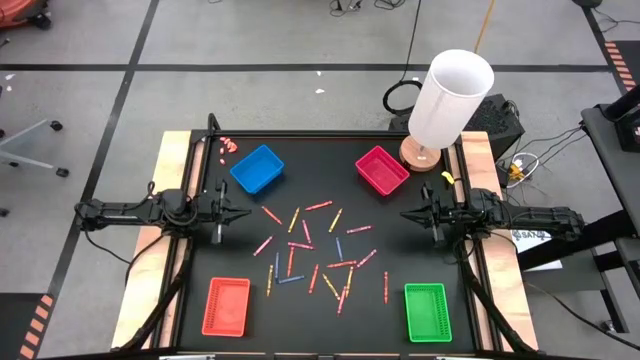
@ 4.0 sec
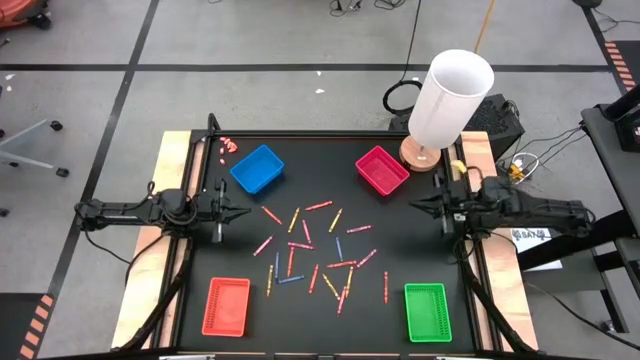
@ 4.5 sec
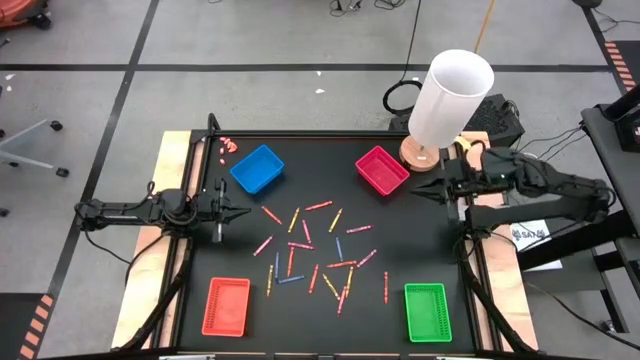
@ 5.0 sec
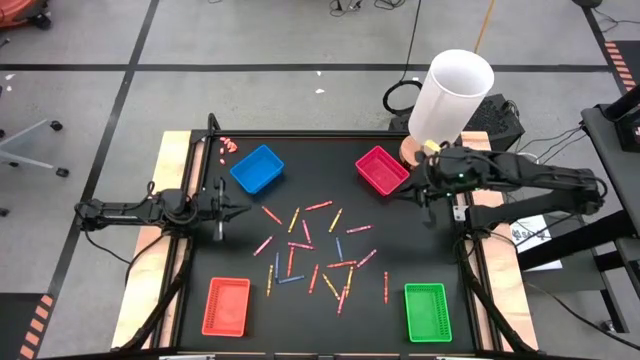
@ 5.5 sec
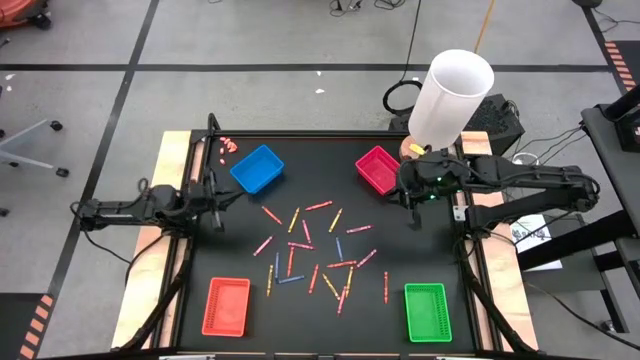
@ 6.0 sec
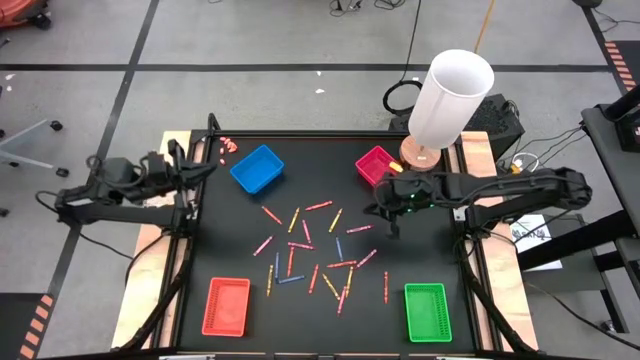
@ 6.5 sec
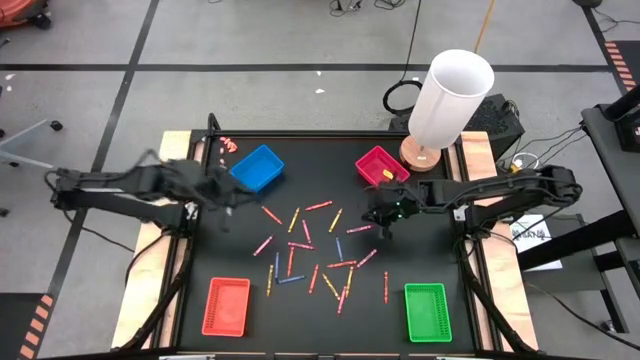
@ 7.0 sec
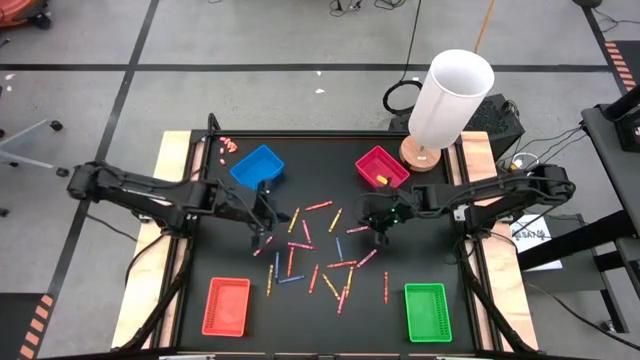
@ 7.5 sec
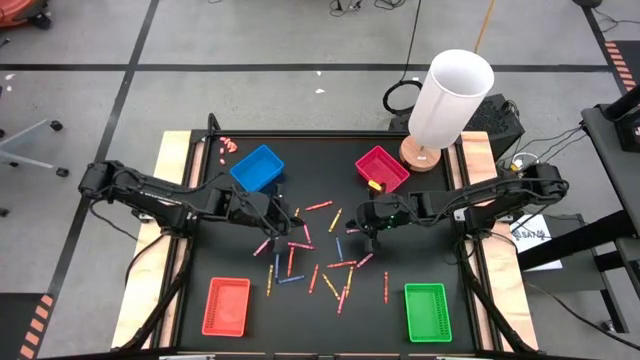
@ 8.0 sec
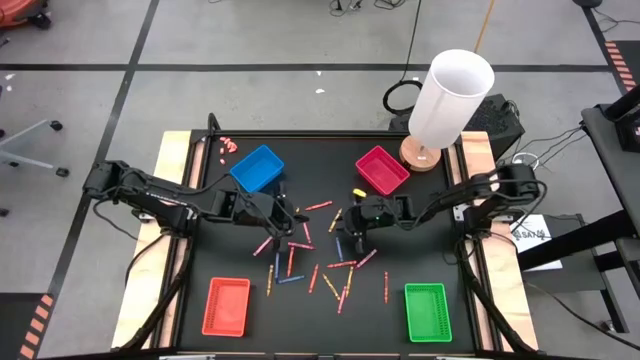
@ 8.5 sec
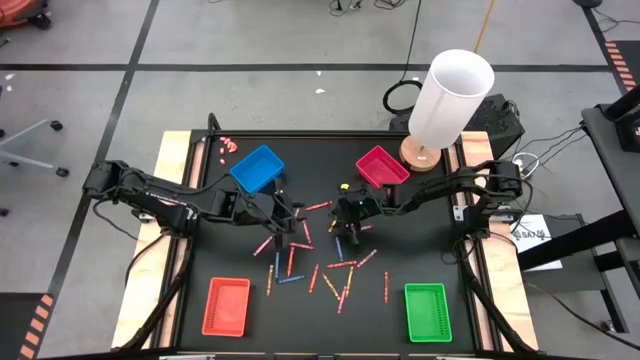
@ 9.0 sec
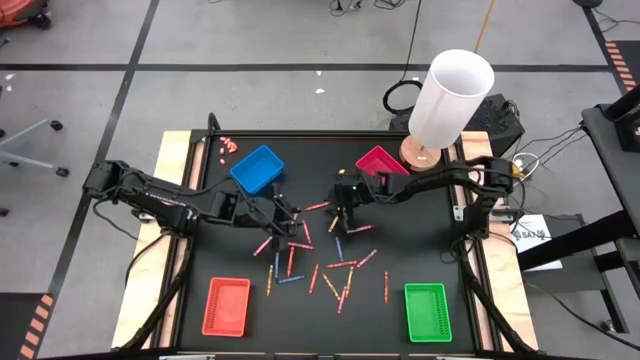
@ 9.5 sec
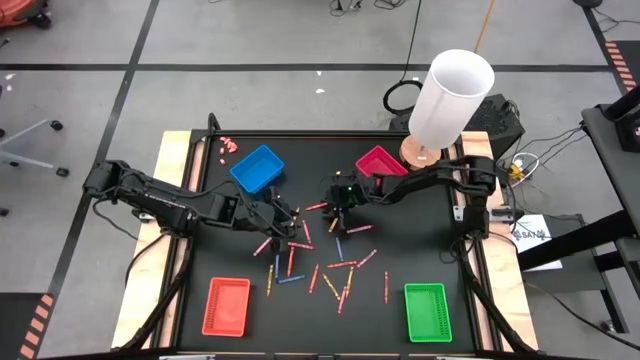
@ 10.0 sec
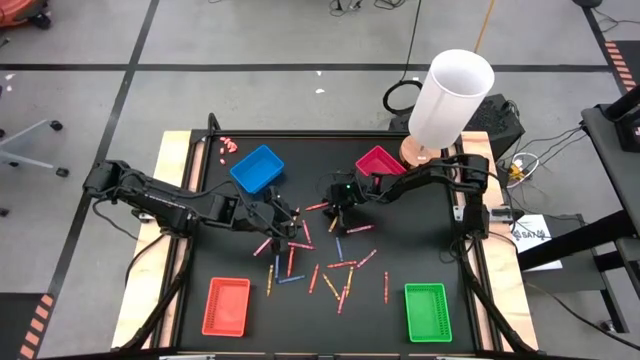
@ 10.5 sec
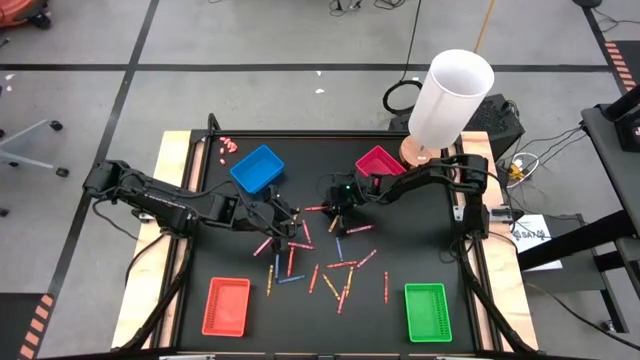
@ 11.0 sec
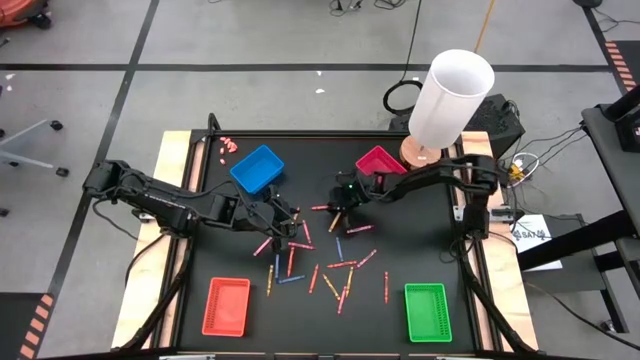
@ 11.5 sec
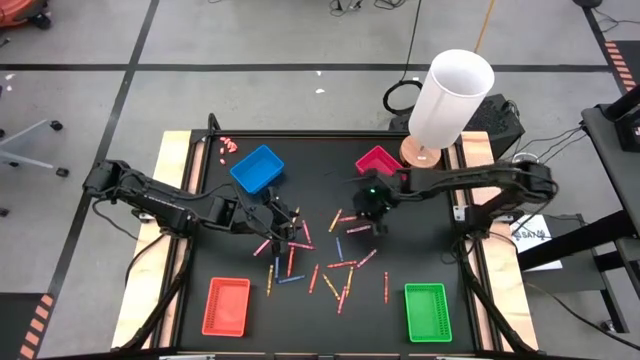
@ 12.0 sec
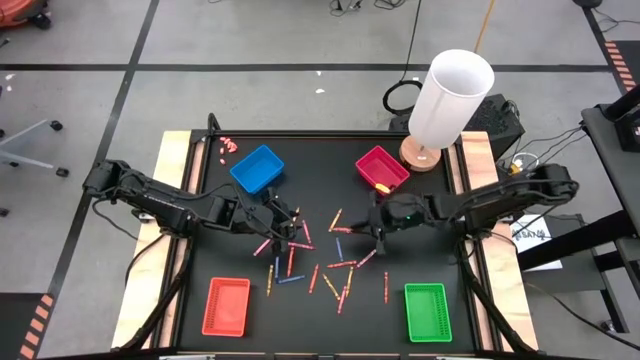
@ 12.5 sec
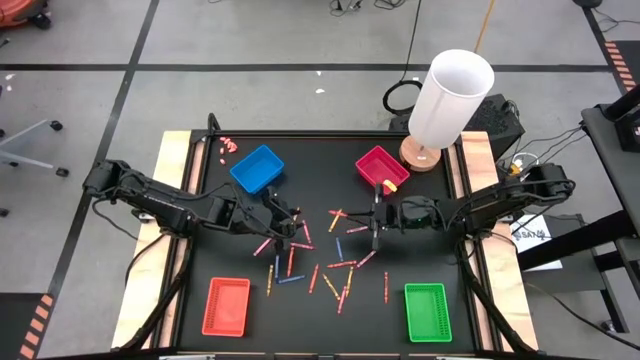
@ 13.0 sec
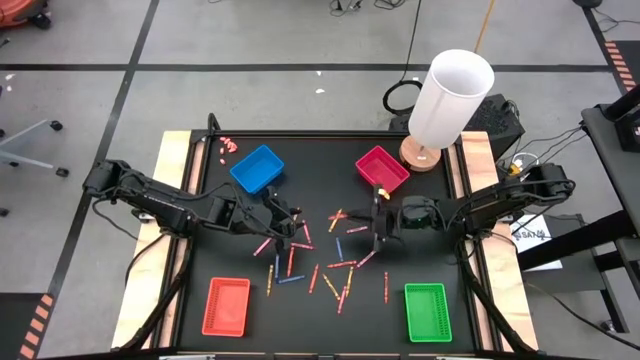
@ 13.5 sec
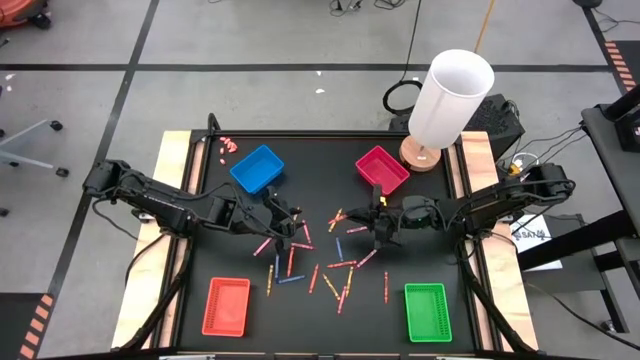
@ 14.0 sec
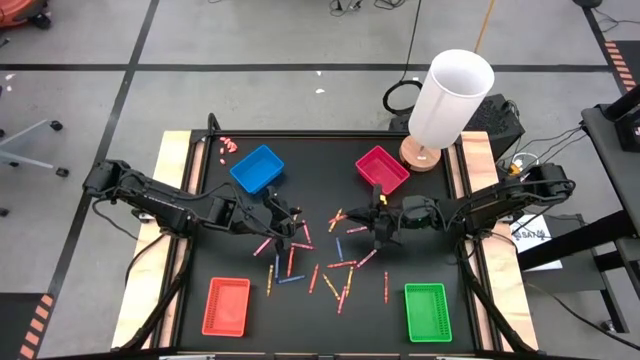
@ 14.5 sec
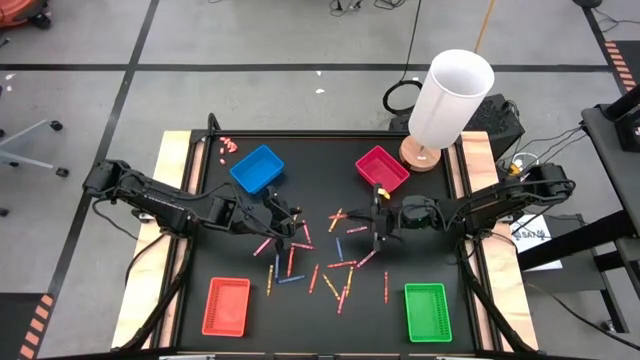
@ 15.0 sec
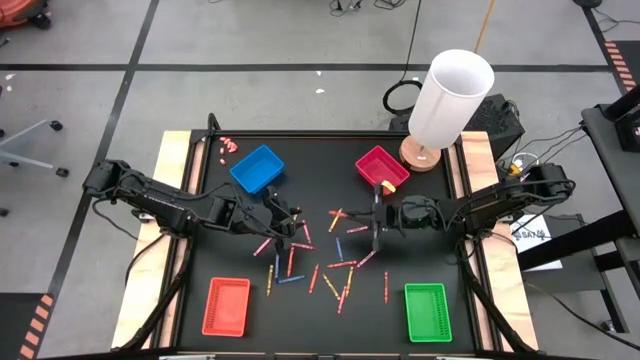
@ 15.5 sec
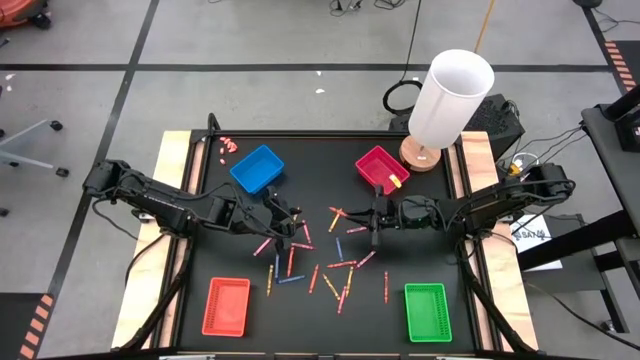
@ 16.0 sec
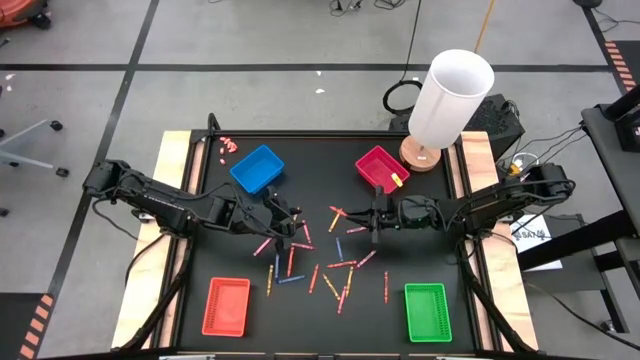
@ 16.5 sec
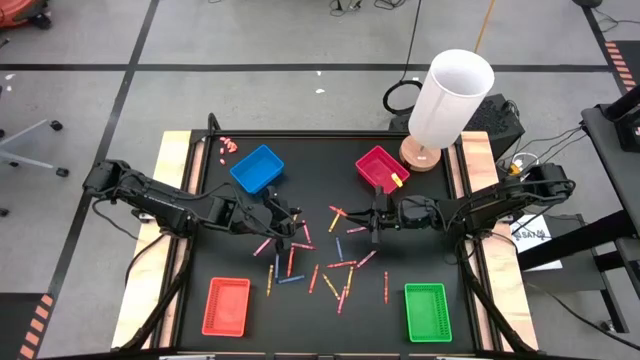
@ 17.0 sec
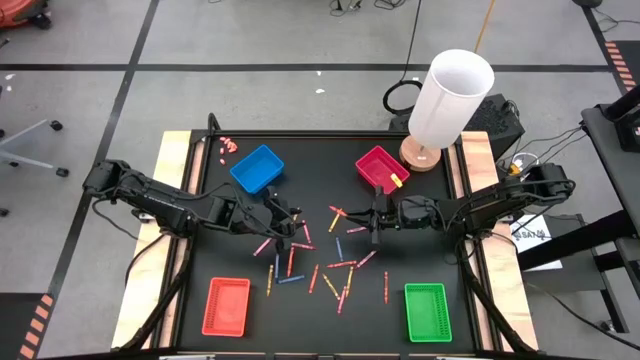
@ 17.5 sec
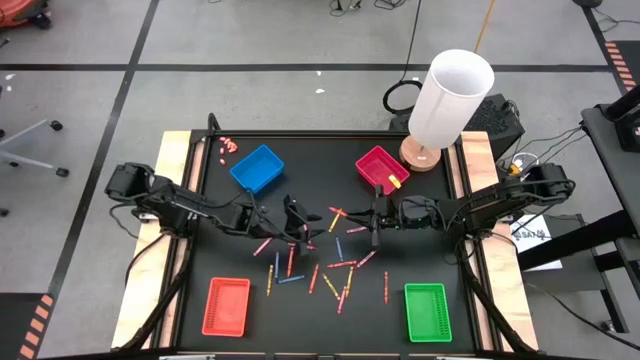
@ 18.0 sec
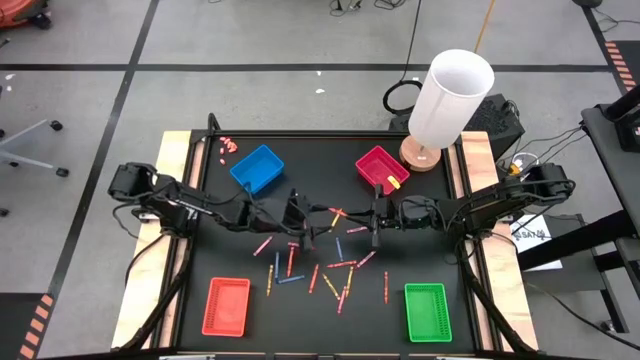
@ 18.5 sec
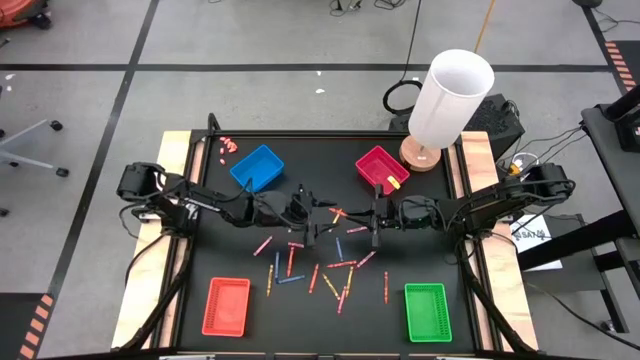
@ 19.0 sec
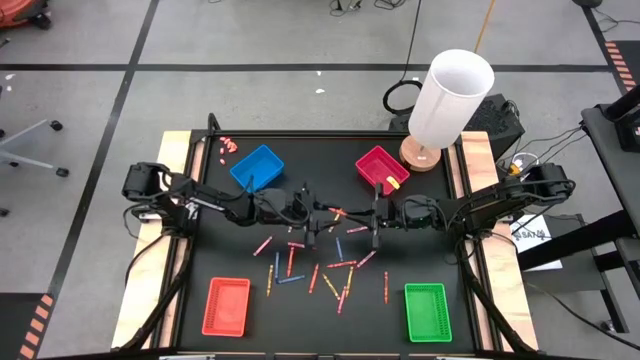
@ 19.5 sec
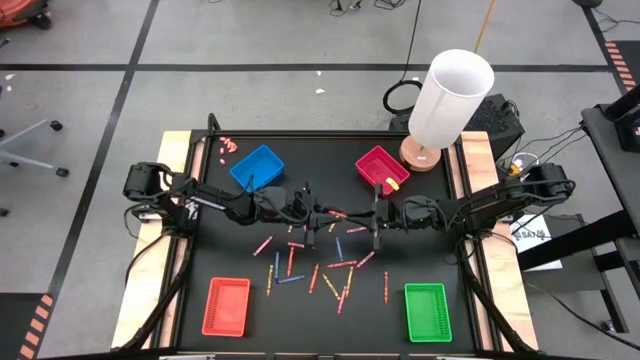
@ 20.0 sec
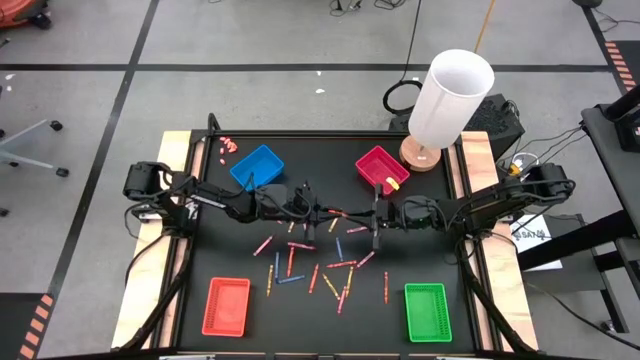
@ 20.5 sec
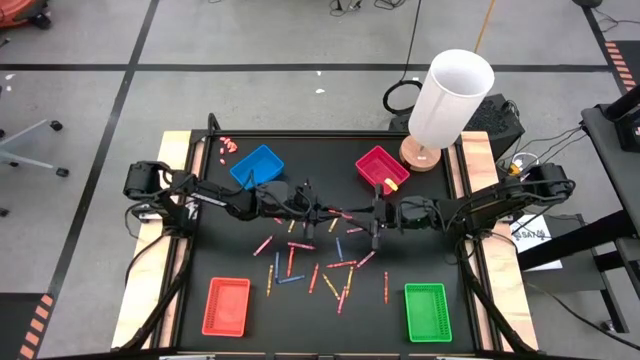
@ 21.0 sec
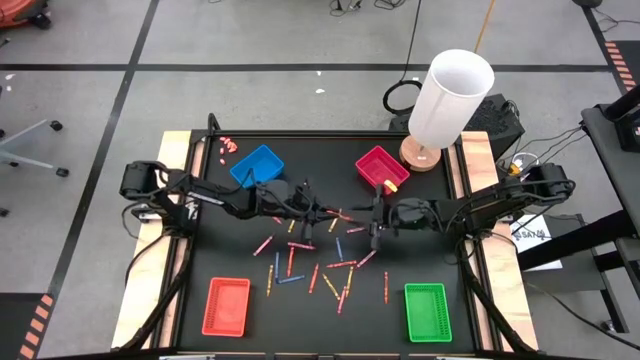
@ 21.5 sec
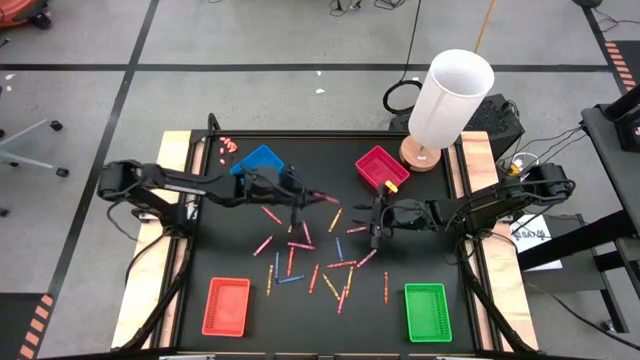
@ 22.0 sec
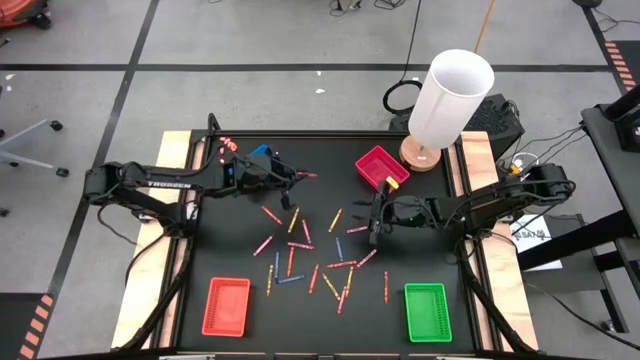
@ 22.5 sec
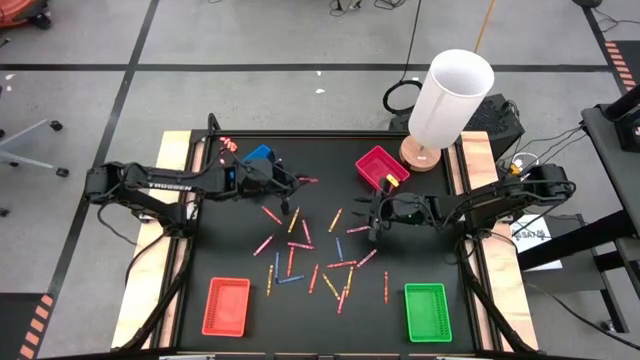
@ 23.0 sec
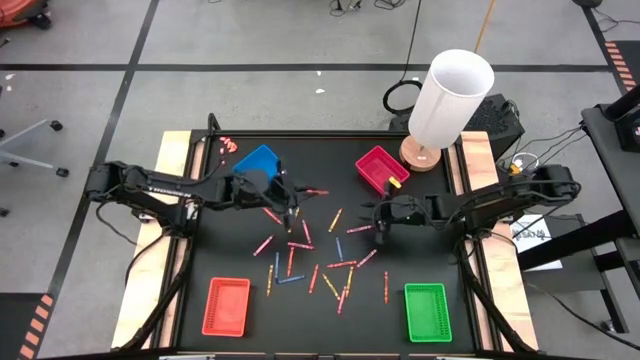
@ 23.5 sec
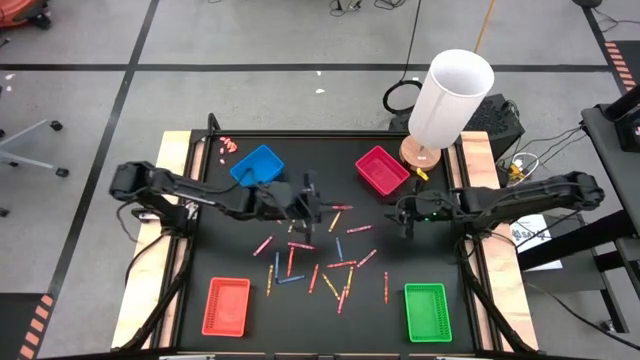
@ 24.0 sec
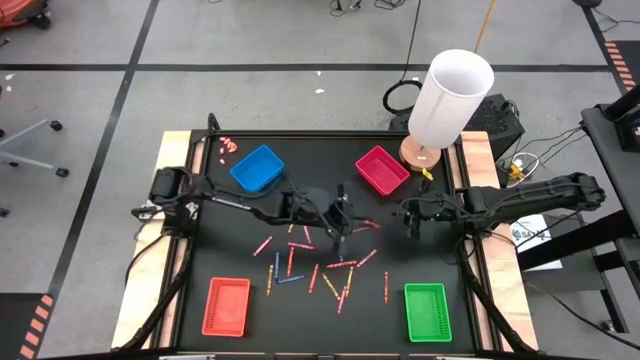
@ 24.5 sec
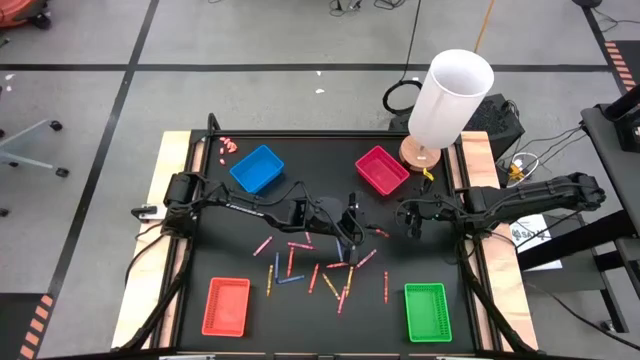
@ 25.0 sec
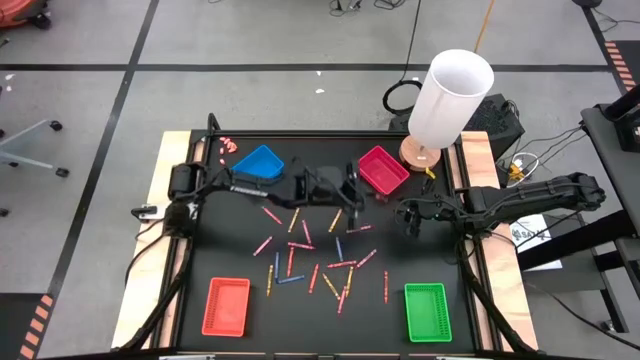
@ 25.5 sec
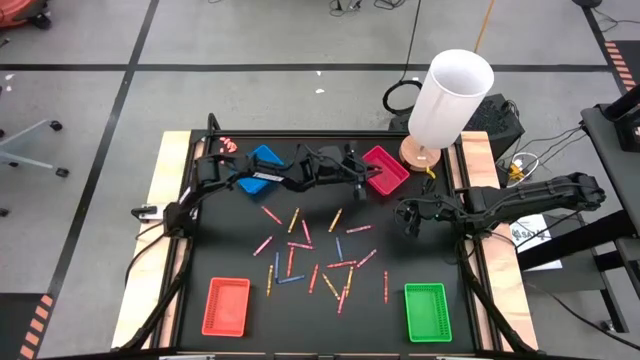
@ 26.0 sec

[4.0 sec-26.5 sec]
Task: Sort crayons
Put the orange crayon into the red bin
